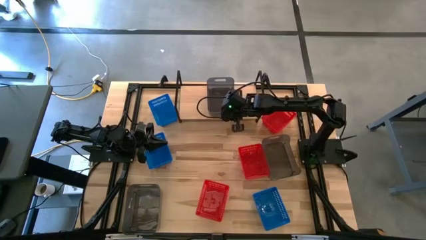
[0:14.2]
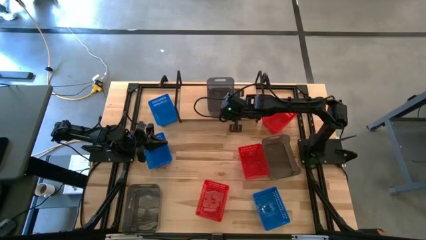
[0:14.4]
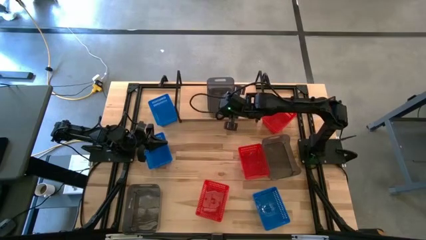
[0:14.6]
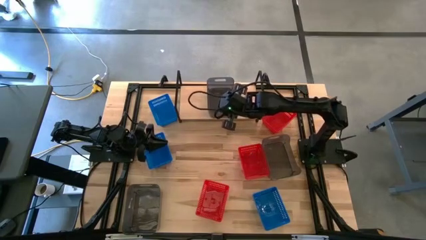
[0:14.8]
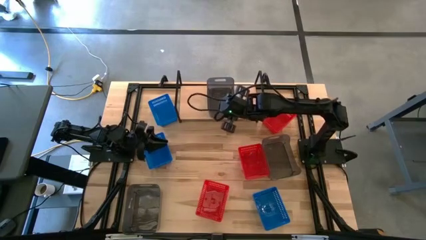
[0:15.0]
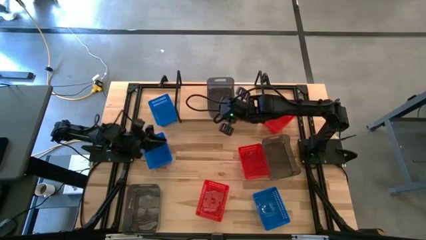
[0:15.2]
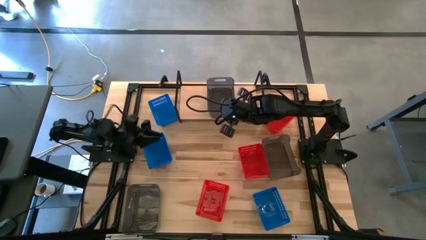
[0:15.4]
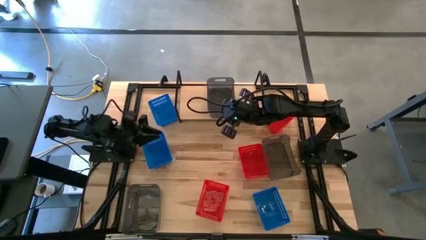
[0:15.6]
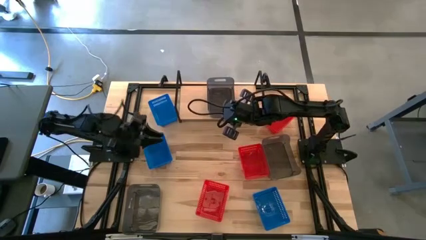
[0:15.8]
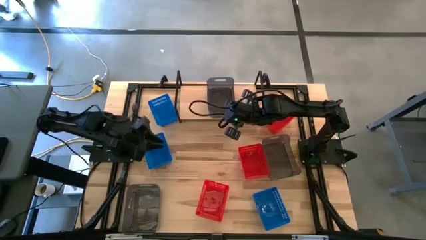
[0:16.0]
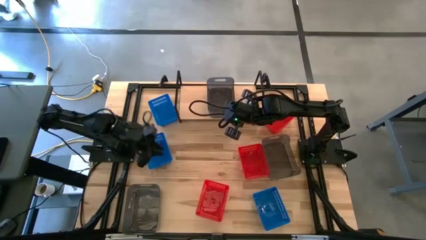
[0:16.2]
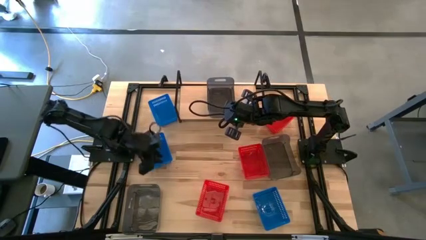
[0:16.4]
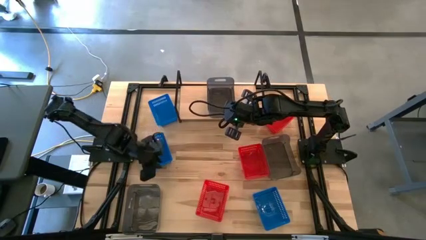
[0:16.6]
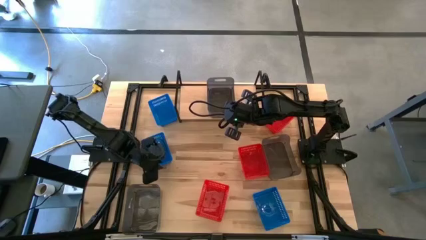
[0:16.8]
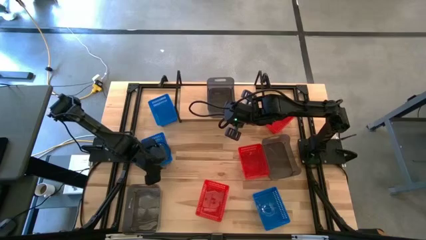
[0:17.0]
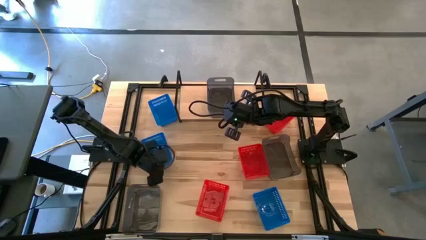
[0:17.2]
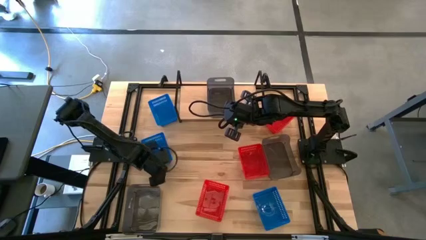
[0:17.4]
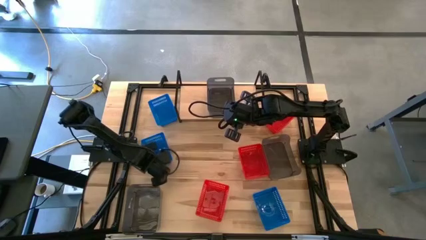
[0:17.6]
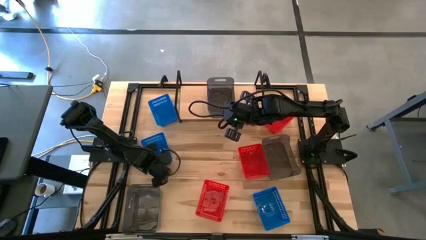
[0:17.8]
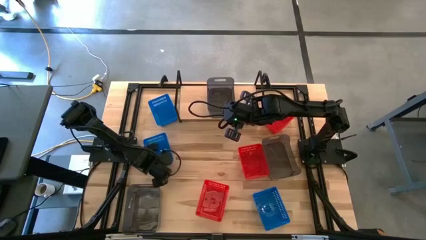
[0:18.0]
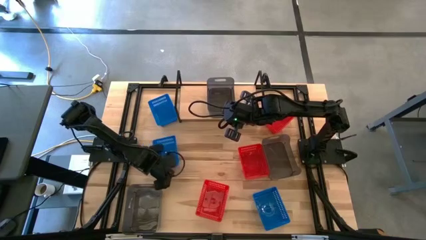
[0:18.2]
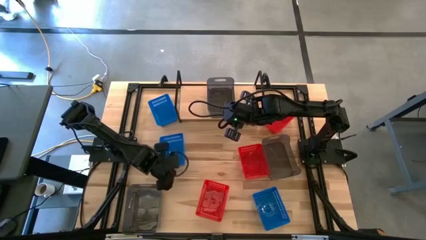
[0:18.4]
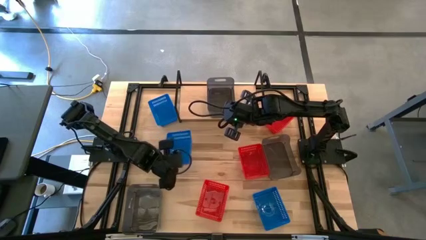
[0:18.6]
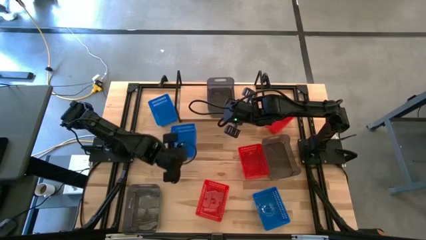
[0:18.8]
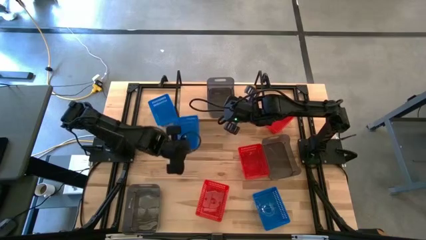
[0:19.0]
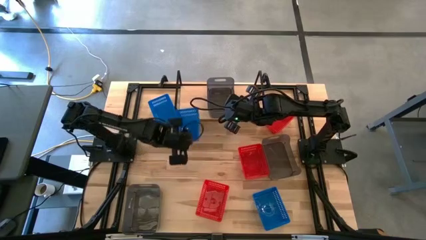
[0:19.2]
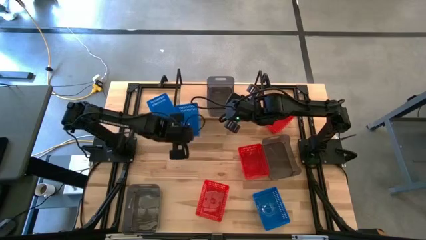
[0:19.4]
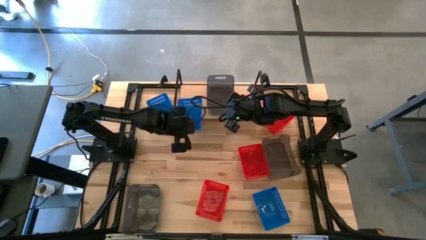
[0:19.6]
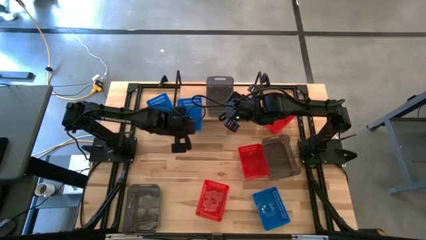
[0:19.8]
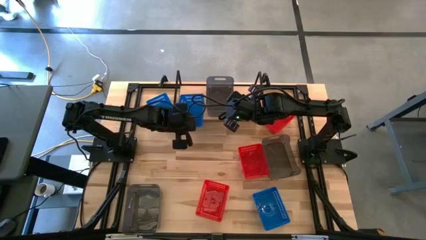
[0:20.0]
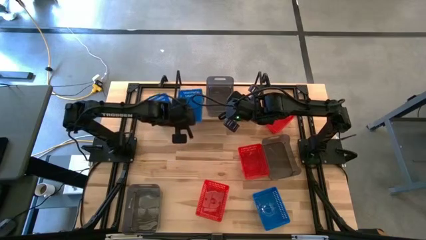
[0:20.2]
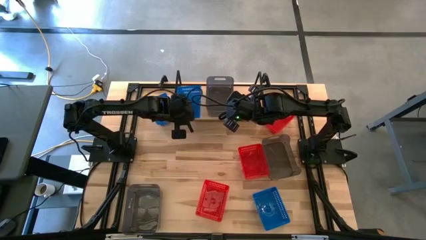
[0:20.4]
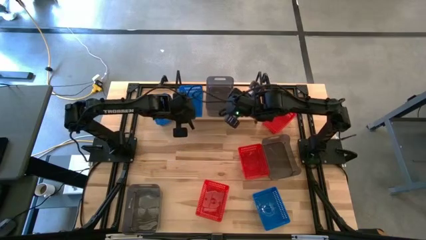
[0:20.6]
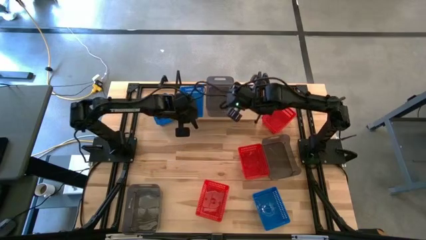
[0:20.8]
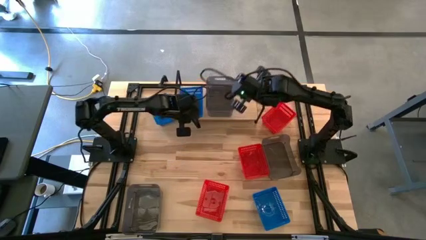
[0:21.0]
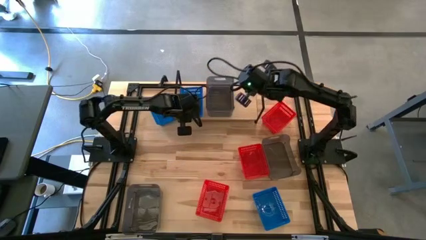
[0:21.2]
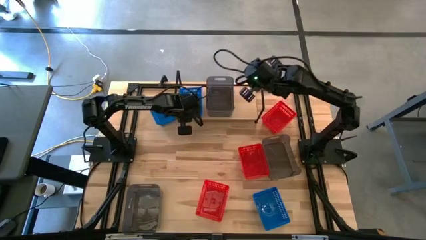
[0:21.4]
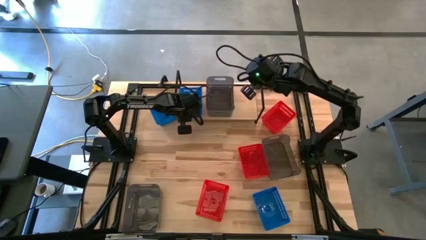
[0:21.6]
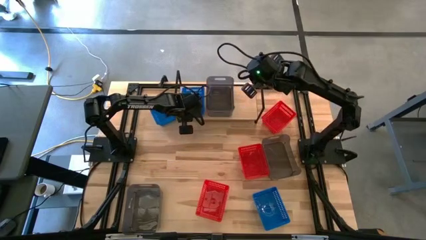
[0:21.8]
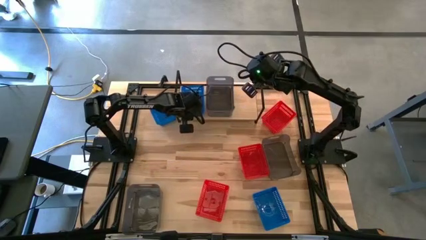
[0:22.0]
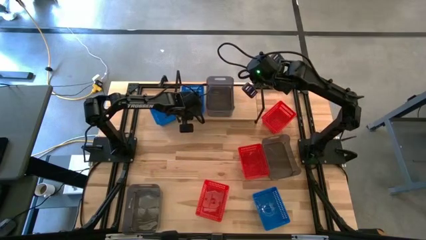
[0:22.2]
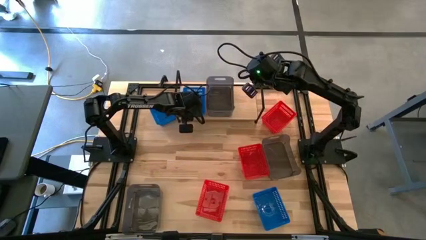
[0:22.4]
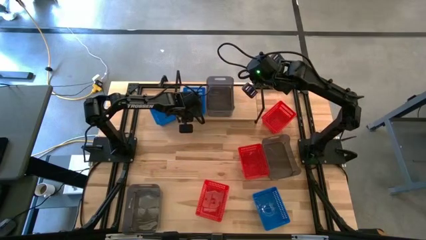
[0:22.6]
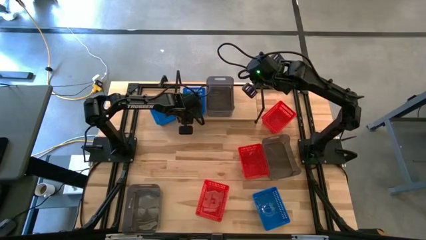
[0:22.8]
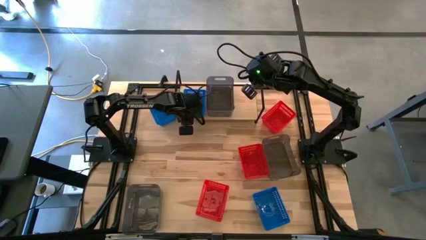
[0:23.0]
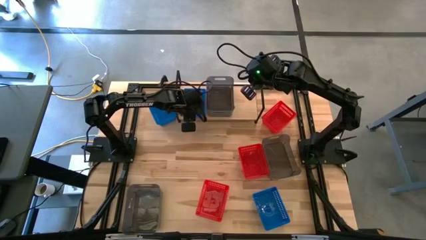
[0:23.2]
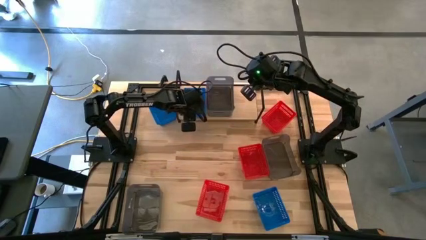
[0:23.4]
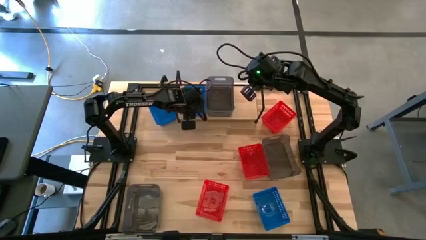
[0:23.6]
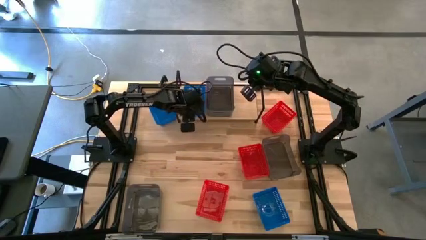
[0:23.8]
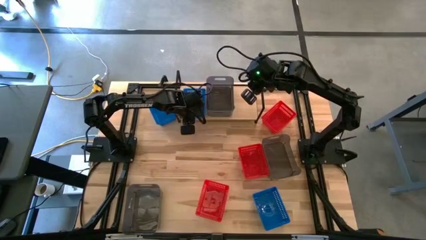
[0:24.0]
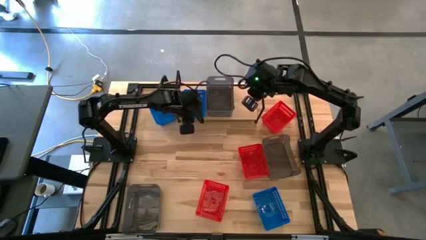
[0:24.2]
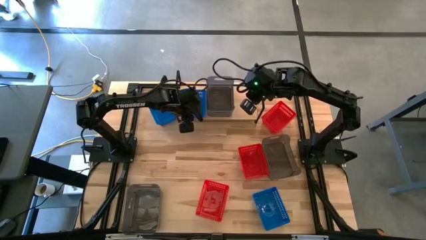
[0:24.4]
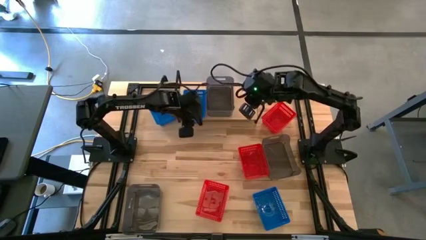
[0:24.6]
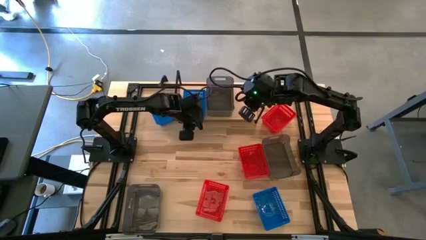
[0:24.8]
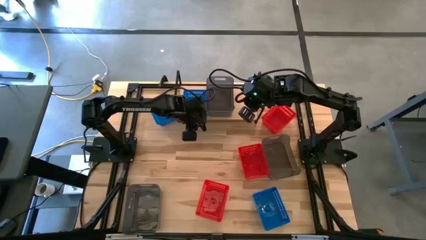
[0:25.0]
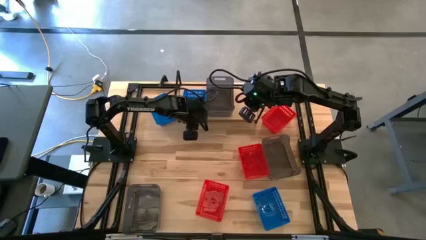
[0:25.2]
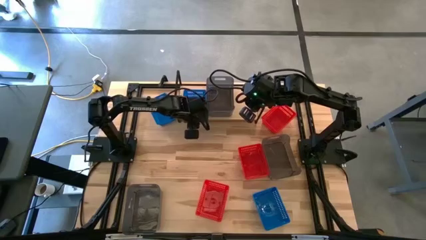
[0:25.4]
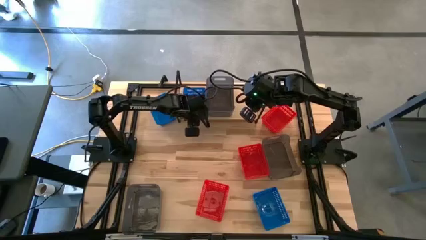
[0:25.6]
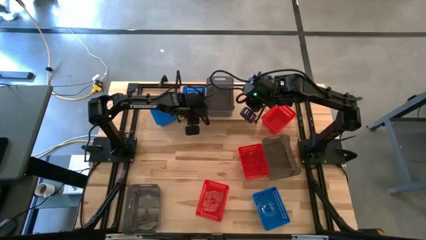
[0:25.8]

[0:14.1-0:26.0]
Task: Stack baskets on shelf by color
Put the middle left blue bin on the shelf
